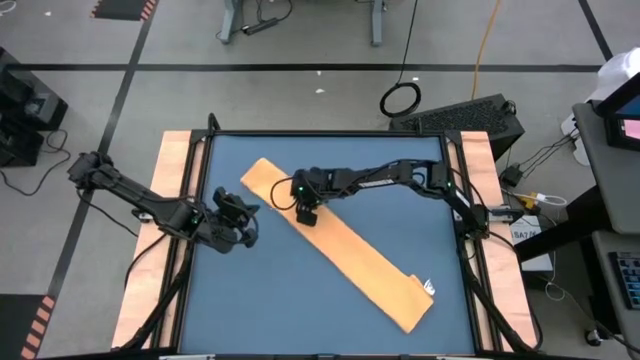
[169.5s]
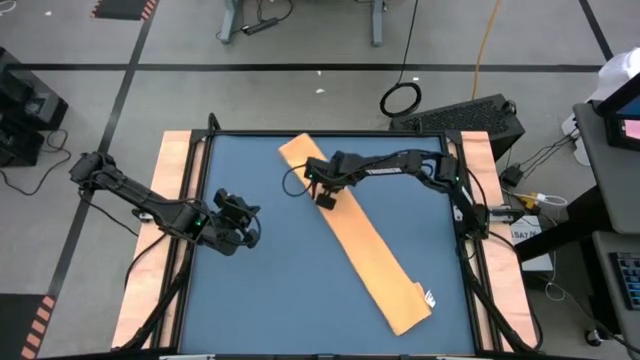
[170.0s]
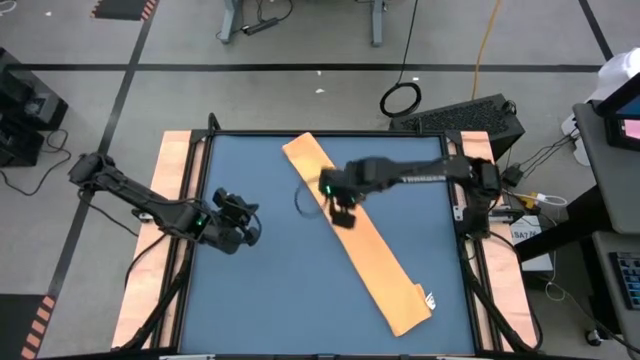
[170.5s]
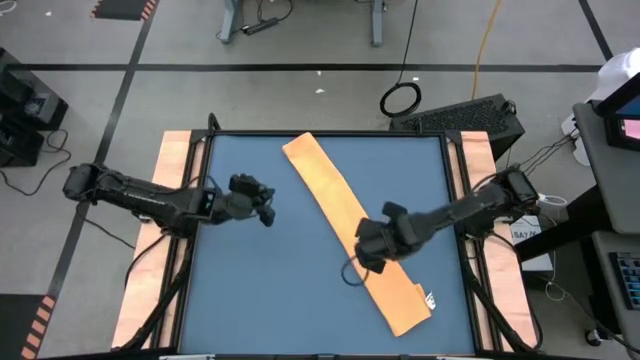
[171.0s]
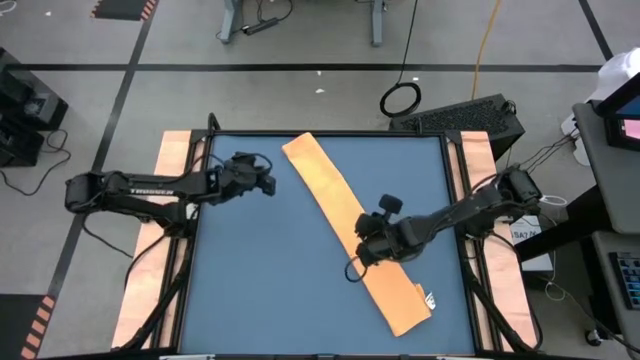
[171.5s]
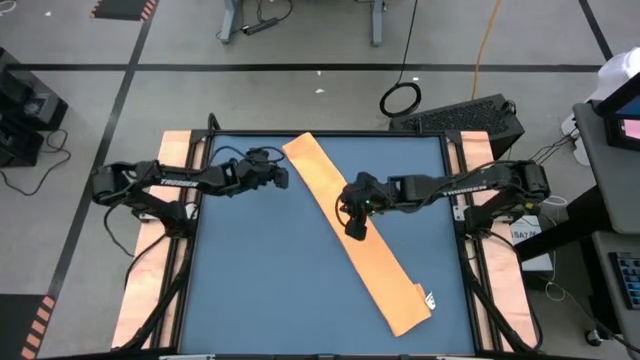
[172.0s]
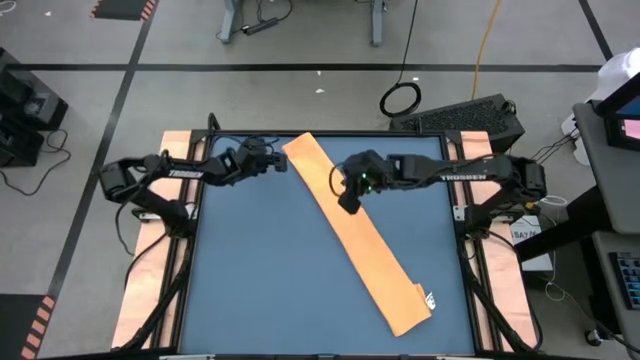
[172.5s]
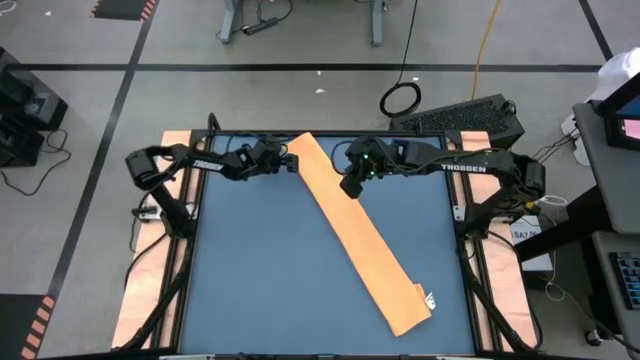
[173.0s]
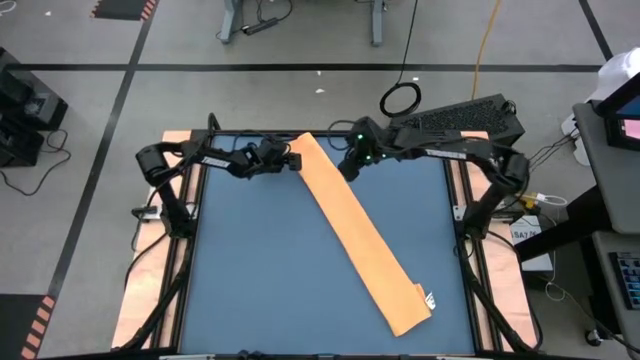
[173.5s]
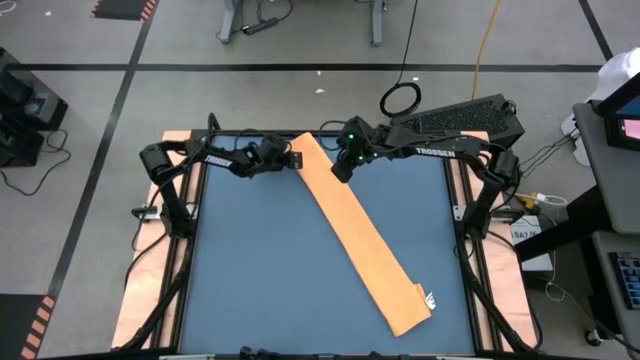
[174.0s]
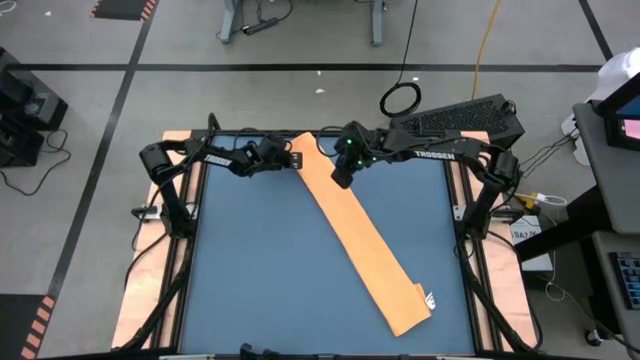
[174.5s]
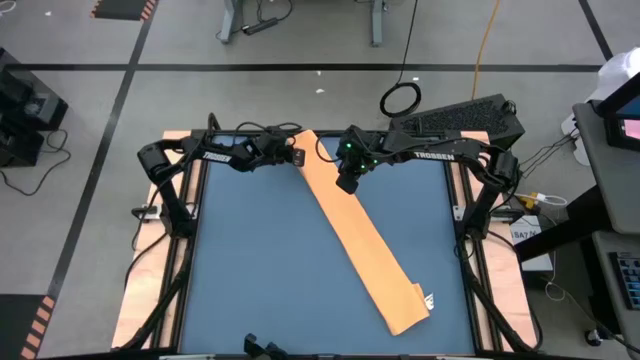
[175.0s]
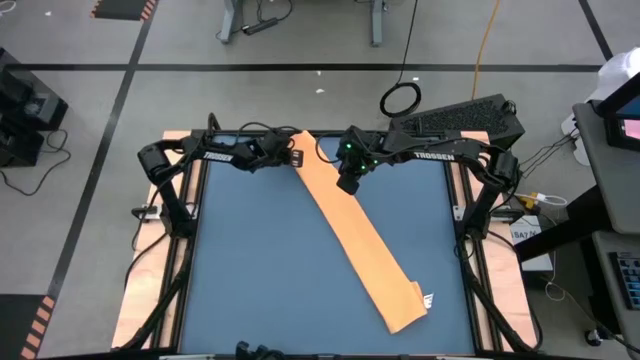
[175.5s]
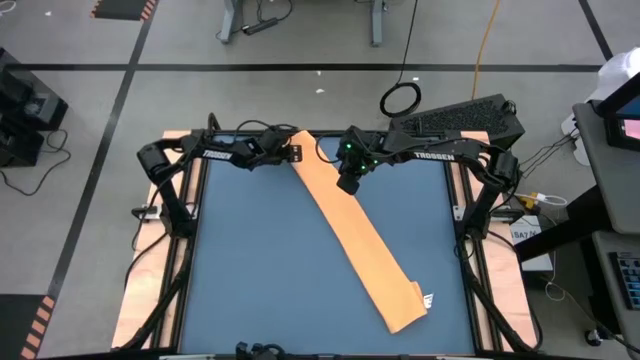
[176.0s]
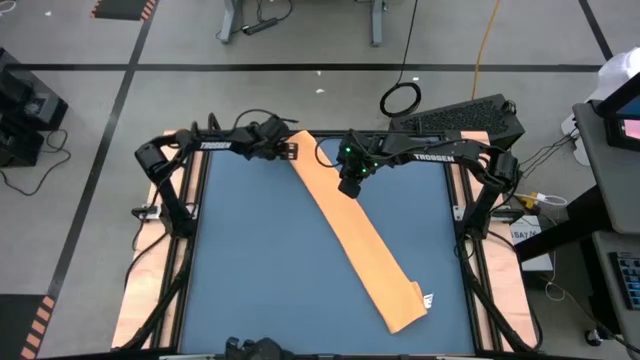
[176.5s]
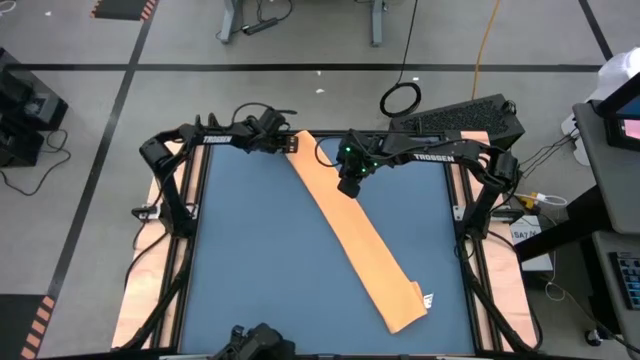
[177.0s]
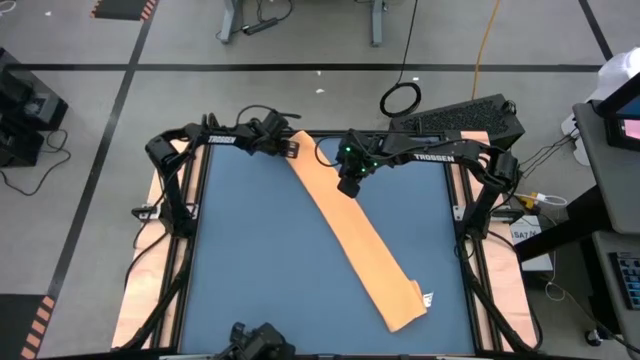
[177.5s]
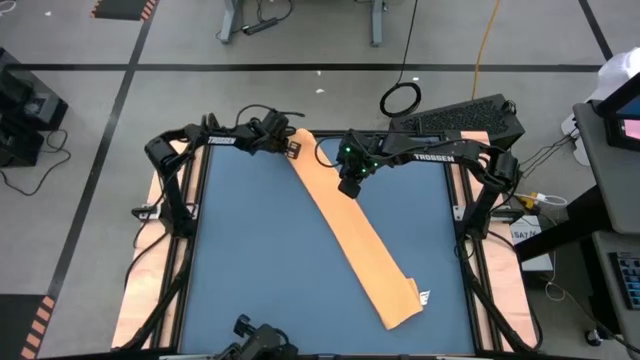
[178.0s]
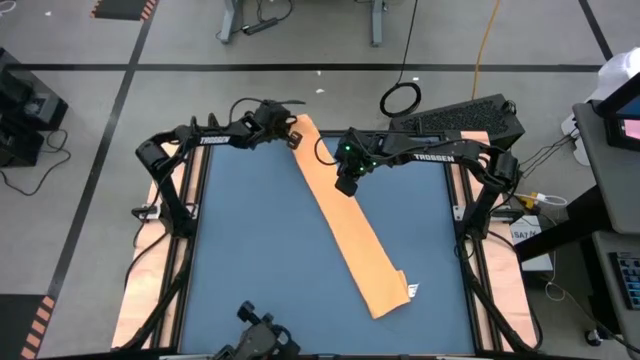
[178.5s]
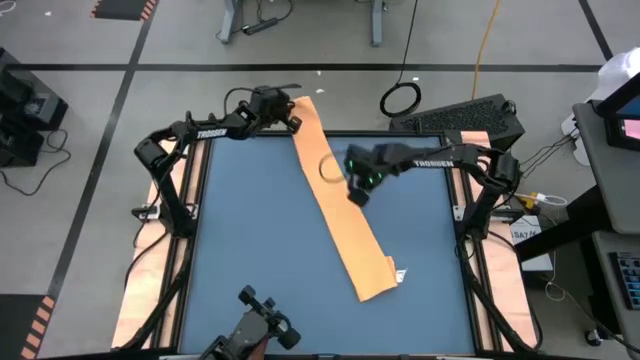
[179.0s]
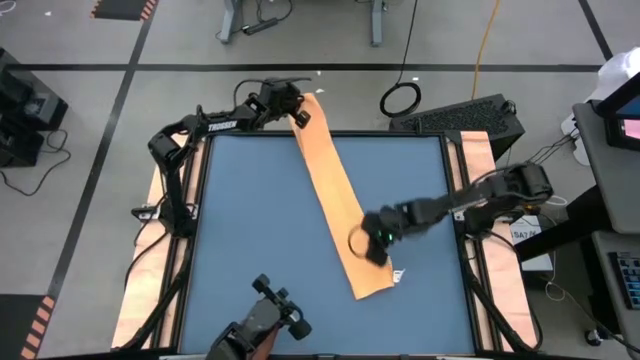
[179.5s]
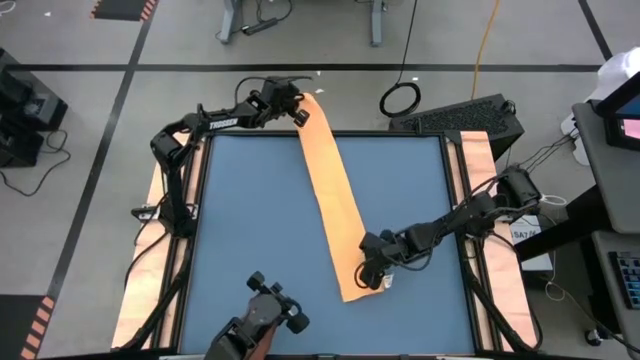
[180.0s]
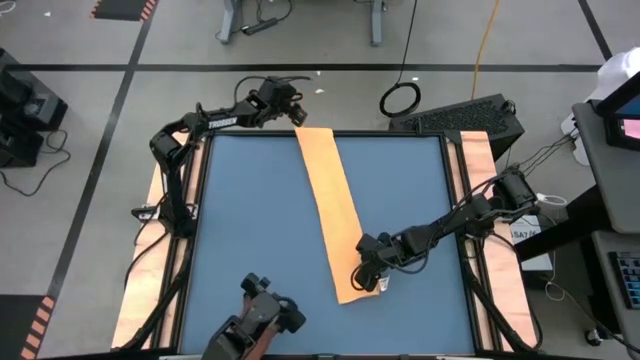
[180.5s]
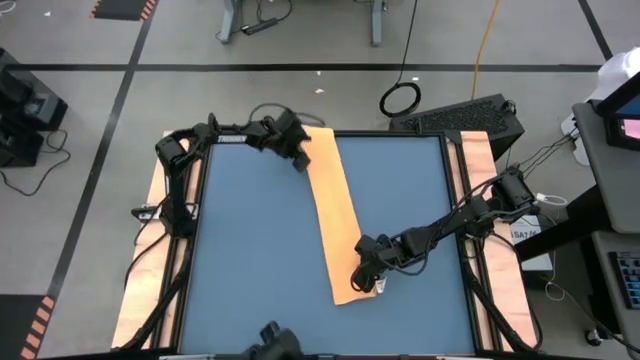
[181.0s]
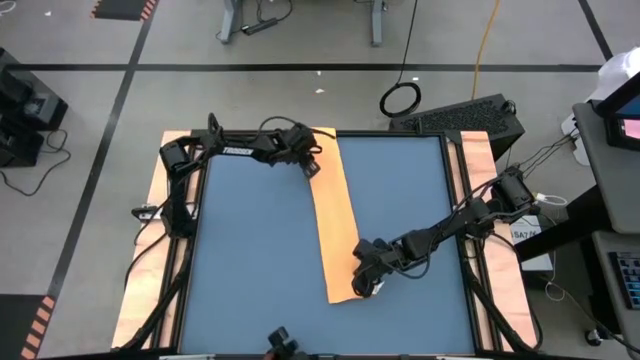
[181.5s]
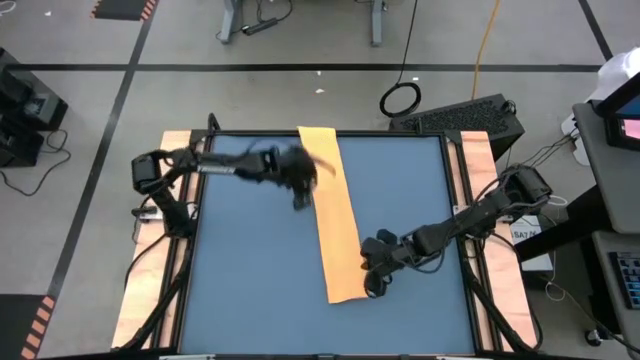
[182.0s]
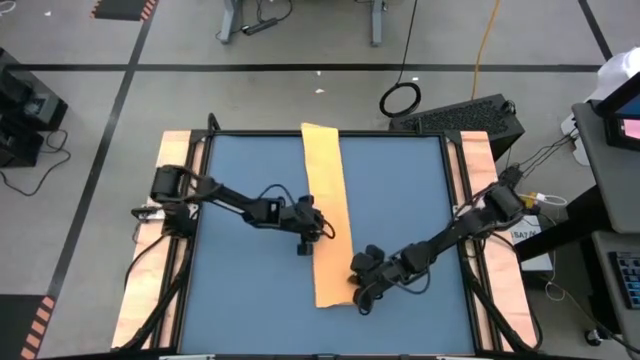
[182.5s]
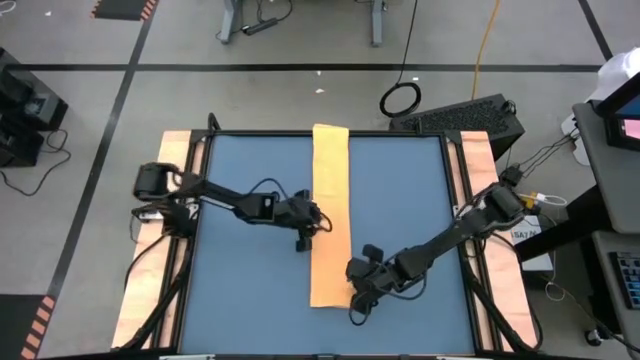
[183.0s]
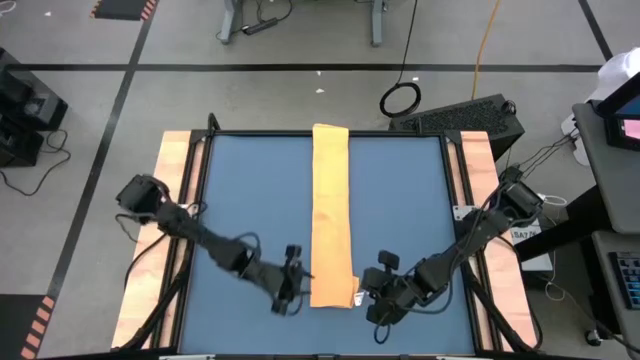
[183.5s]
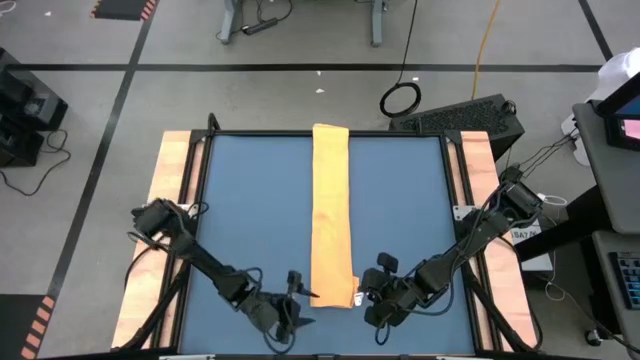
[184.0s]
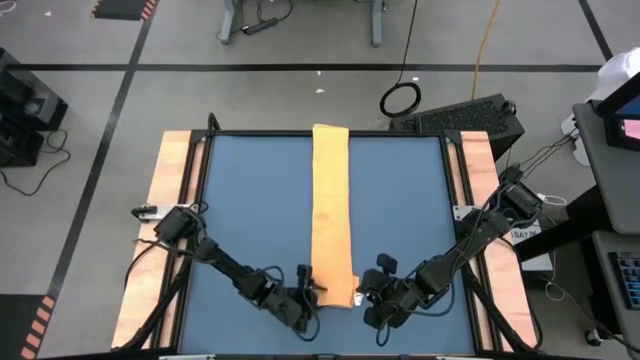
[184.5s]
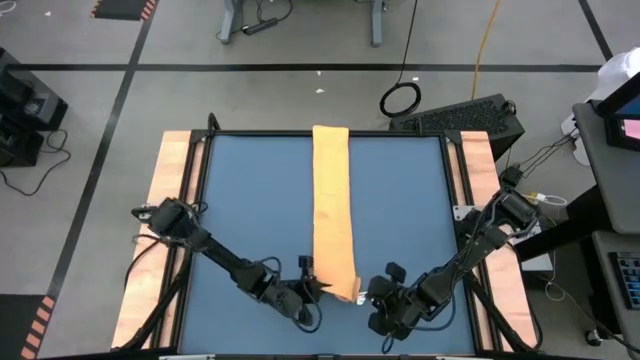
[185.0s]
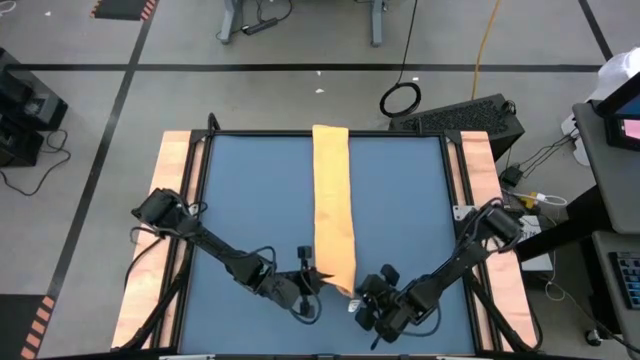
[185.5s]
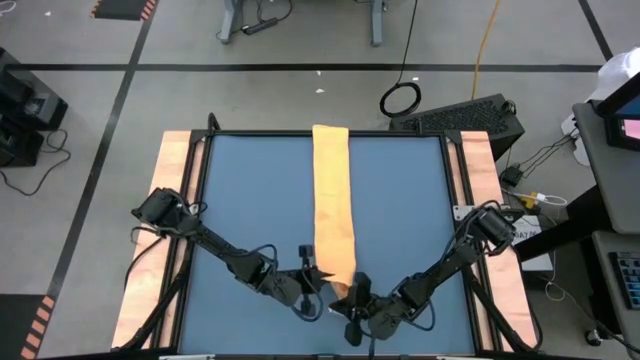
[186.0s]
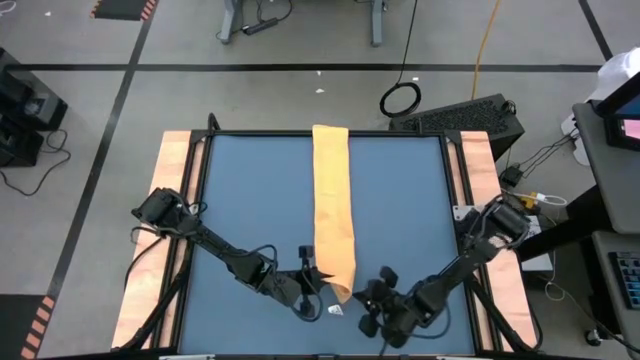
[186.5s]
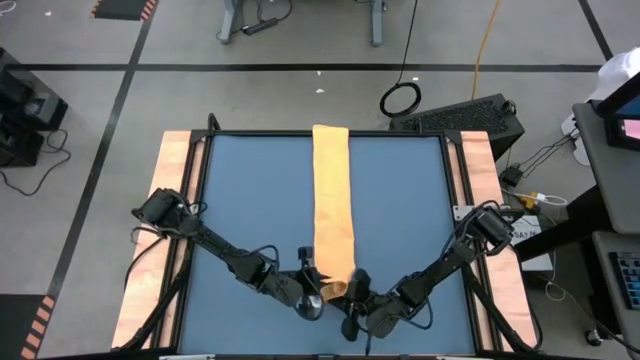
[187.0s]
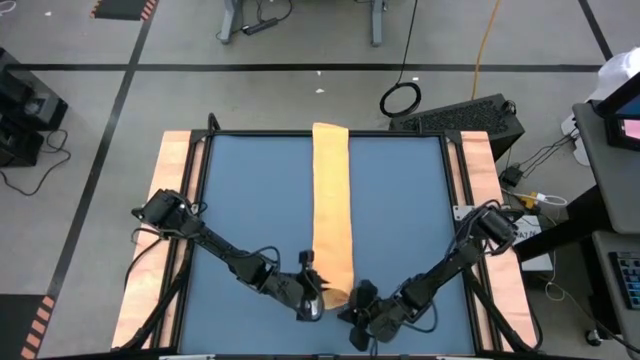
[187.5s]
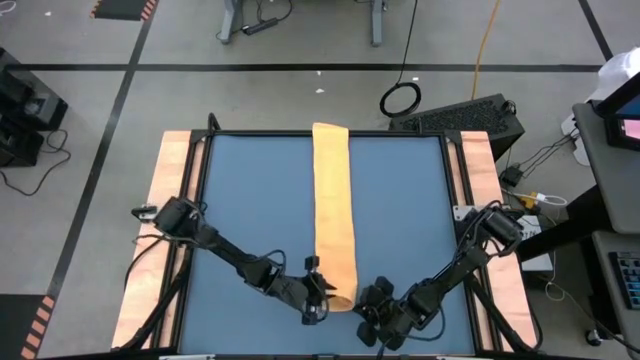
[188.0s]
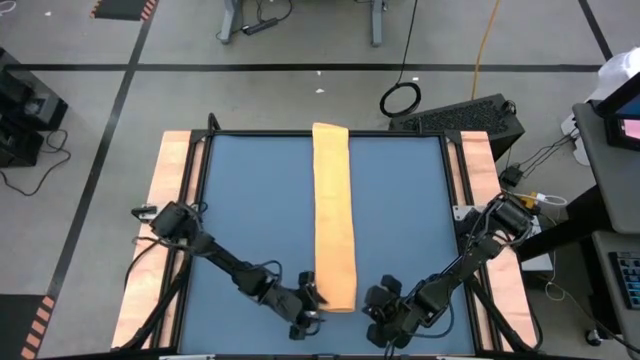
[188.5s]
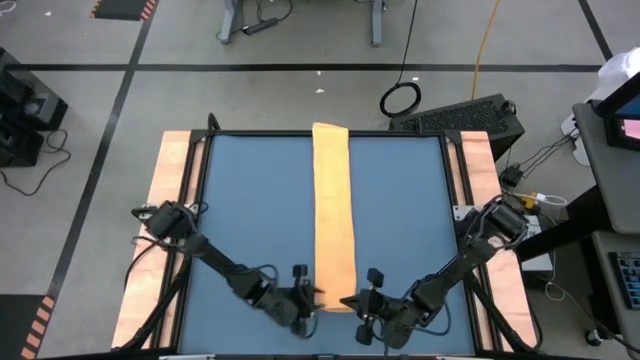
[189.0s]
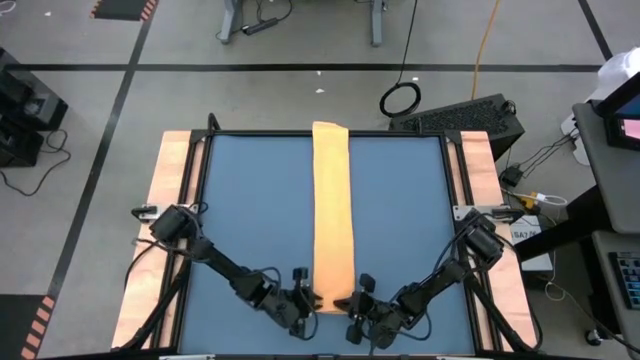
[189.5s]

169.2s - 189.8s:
Task: Roll towel into tight, uniform cylinder
Fold the orange microfiber cloth

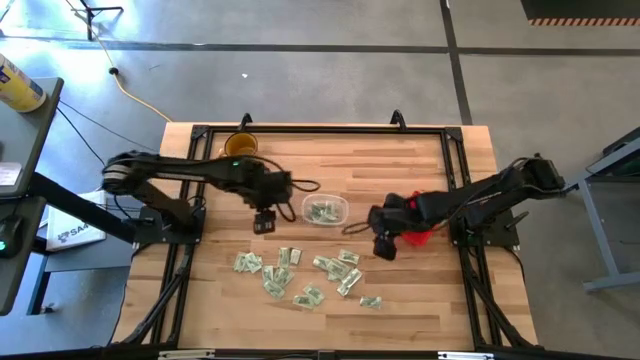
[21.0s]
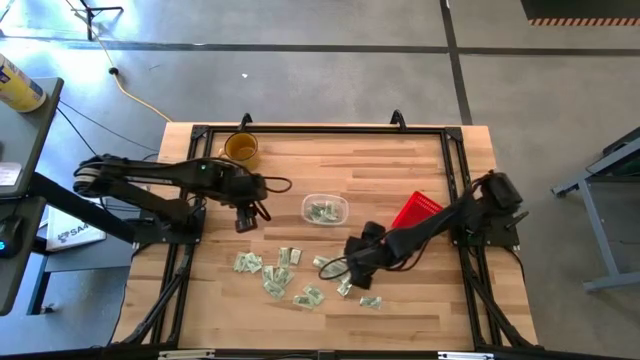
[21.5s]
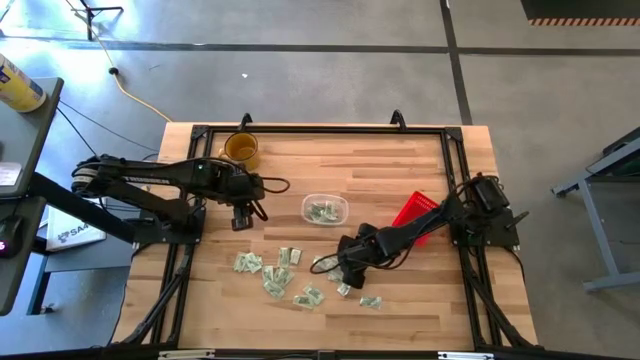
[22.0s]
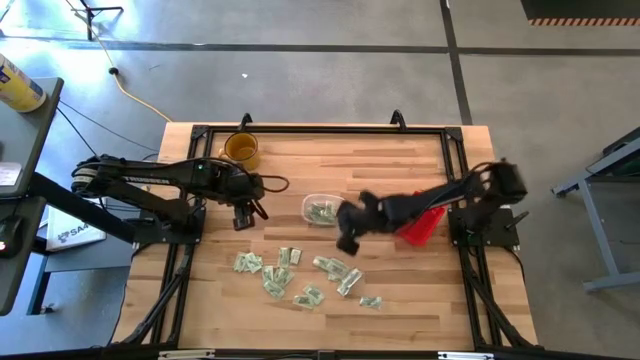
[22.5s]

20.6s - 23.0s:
Task: Pick and place items into bin
Put the white stevia packet into the transparent bin

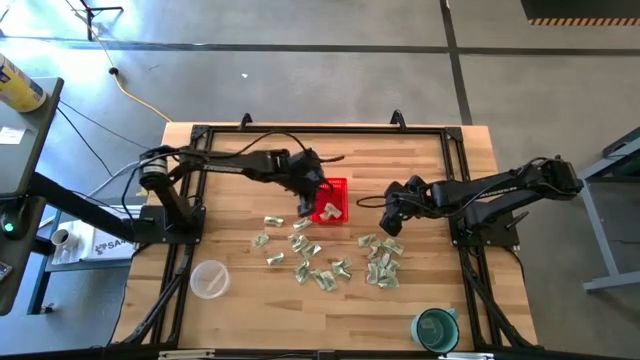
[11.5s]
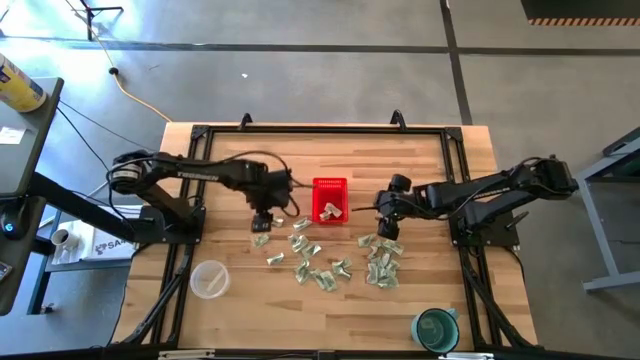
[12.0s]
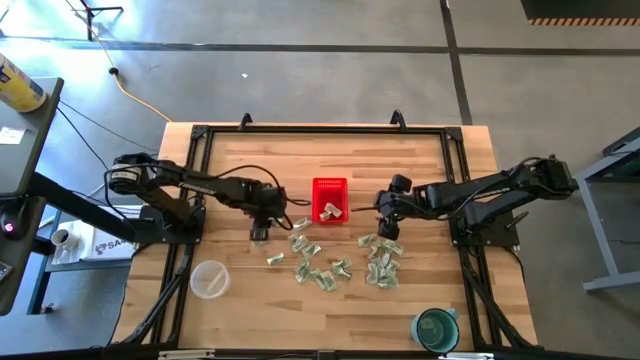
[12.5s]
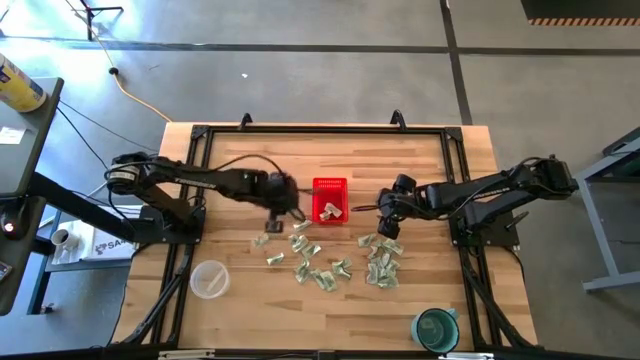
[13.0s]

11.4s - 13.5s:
Task: Pick and place items into bin
Put the light green stevia packet into the red bin
